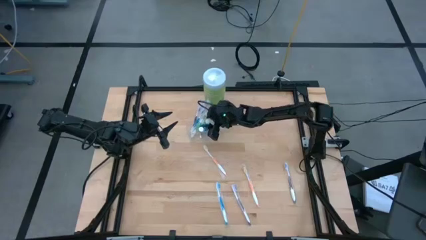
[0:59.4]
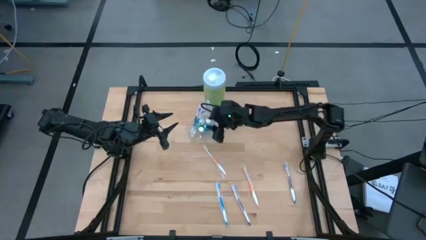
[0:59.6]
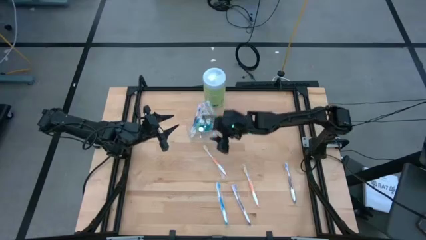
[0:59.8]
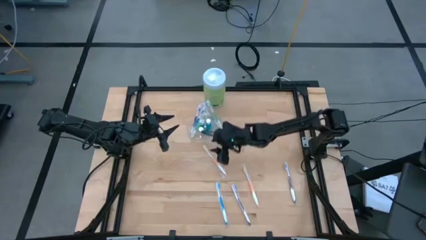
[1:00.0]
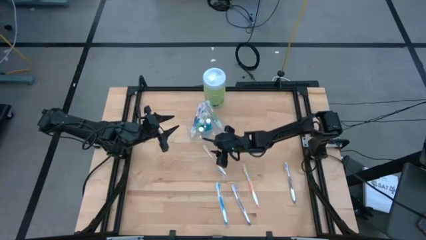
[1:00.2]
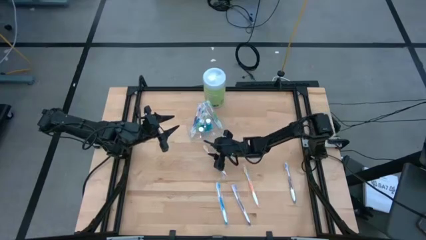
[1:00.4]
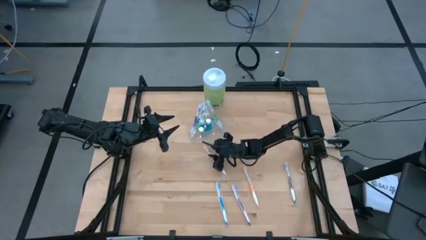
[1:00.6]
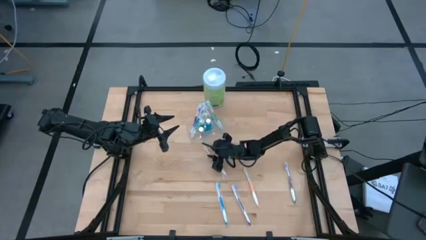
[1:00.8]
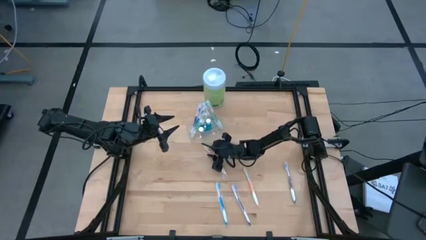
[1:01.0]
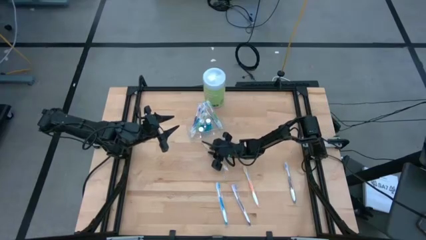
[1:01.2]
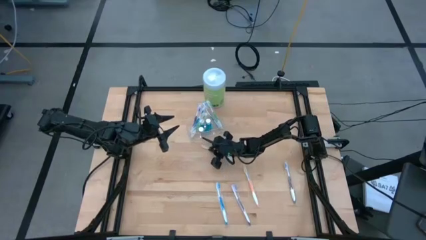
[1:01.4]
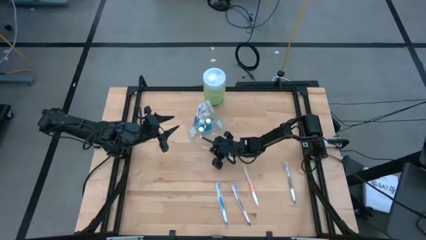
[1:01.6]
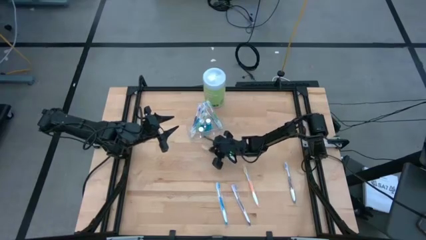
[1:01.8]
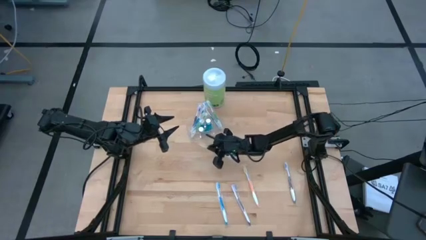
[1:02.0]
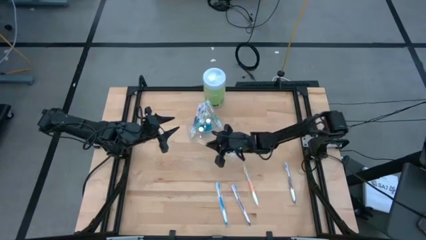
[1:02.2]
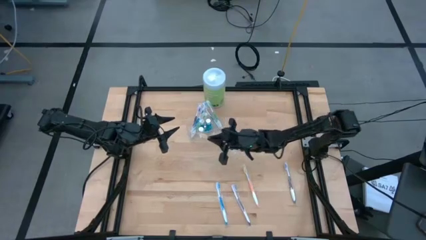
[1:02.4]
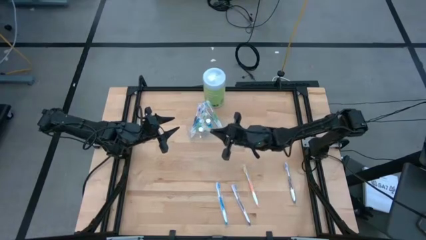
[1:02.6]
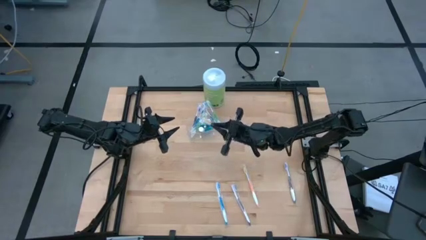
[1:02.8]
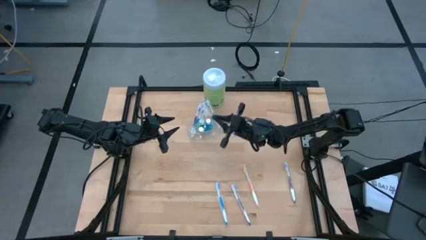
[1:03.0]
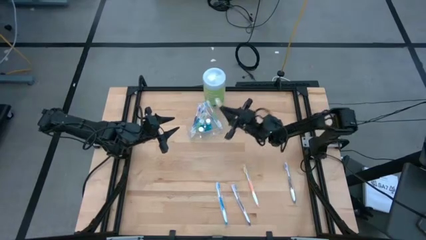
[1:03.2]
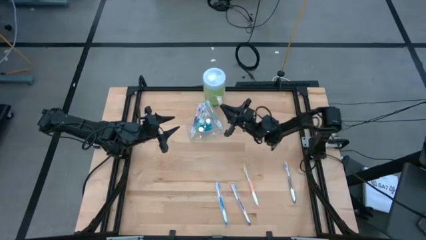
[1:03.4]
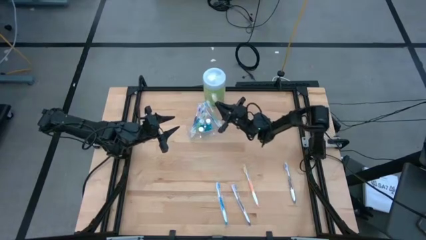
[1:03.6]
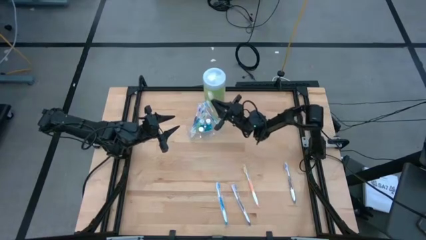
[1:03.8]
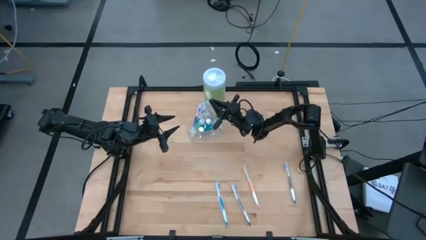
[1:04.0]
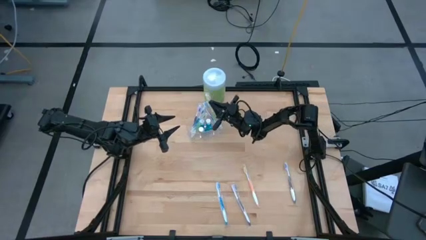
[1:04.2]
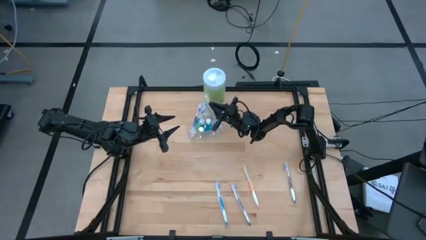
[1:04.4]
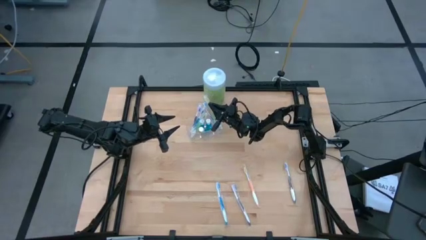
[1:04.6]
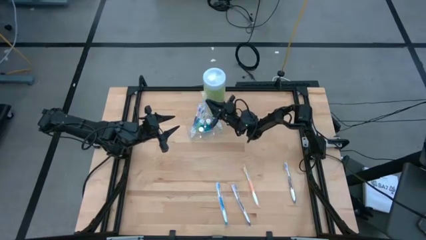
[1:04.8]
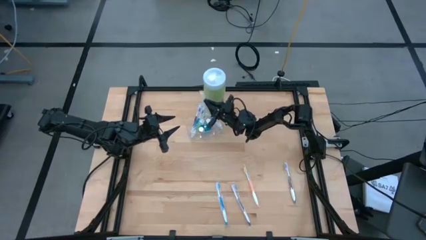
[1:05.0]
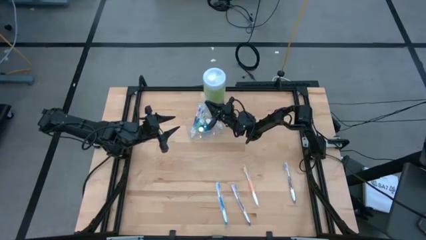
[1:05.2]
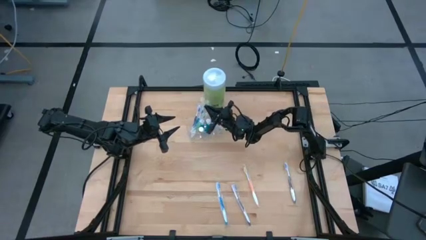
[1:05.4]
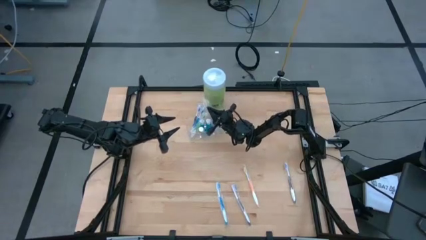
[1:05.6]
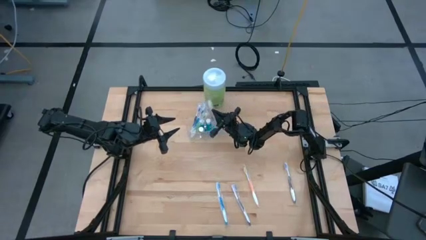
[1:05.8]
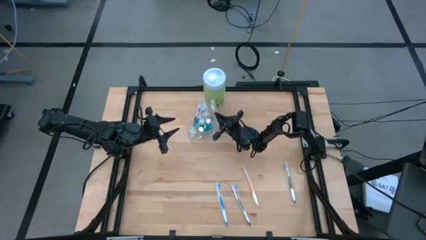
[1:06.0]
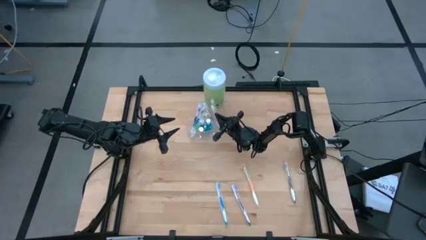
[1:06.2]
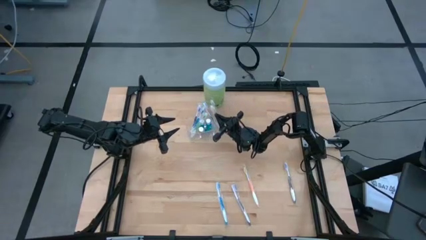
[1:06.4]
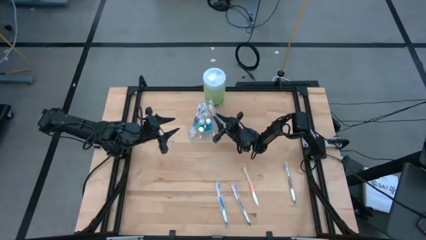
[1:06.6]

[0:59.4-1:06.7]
Task: Pick & Place toothbrushing station
Put the top orange toothbrush into the transparent organizer

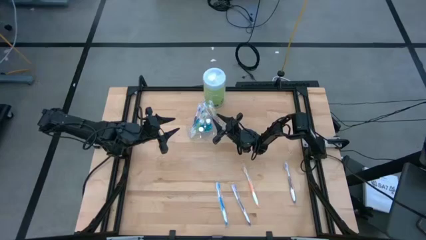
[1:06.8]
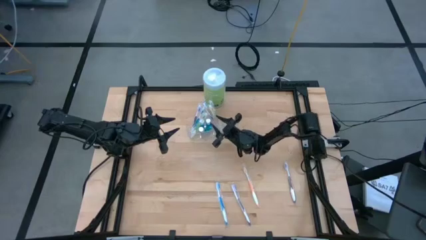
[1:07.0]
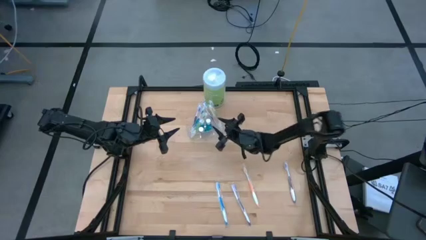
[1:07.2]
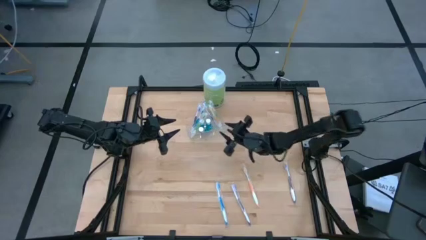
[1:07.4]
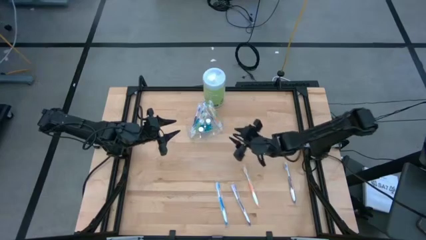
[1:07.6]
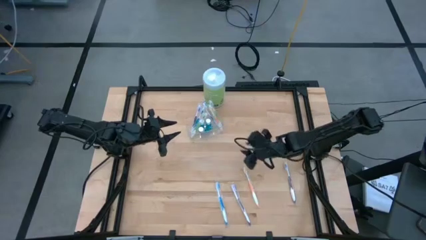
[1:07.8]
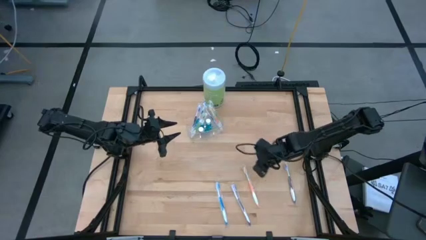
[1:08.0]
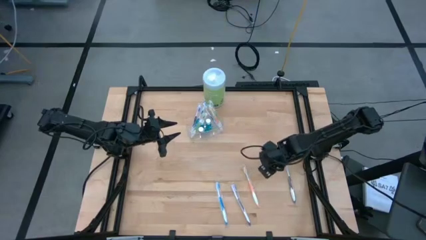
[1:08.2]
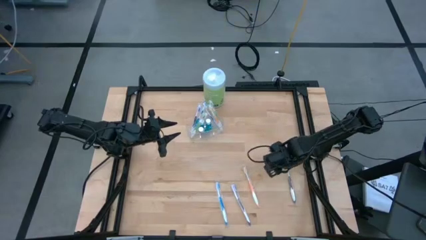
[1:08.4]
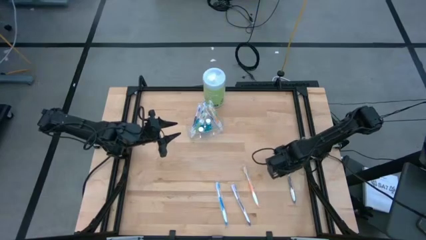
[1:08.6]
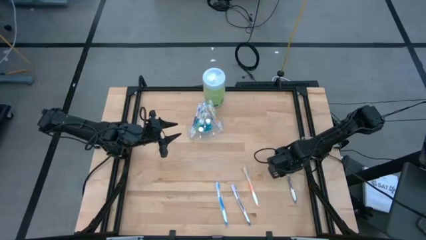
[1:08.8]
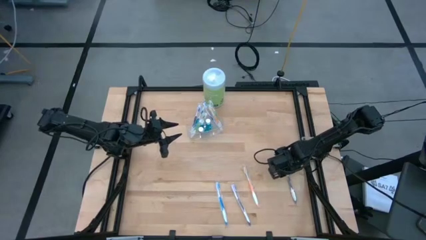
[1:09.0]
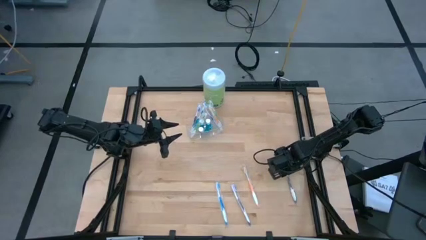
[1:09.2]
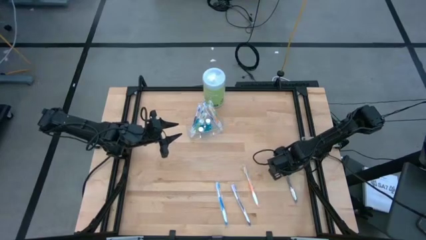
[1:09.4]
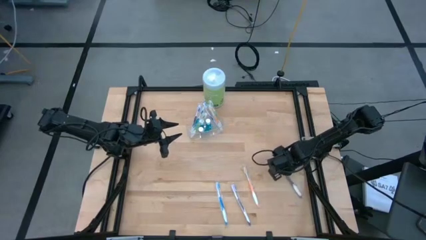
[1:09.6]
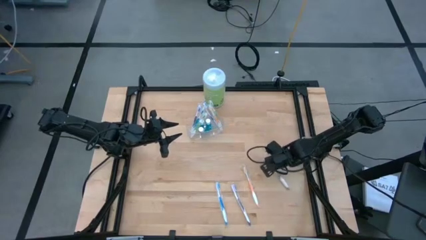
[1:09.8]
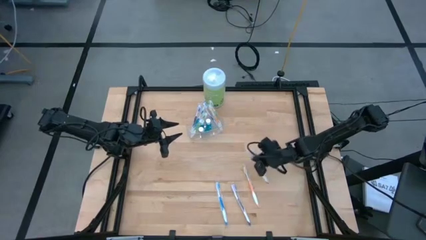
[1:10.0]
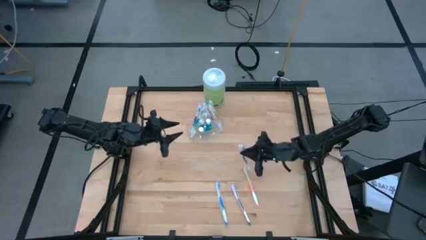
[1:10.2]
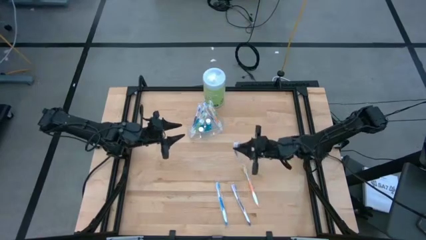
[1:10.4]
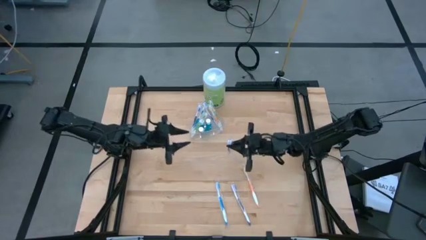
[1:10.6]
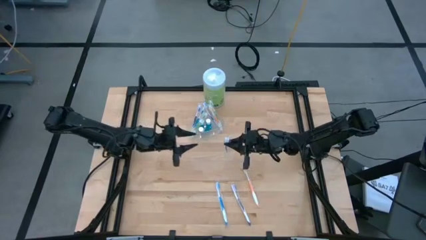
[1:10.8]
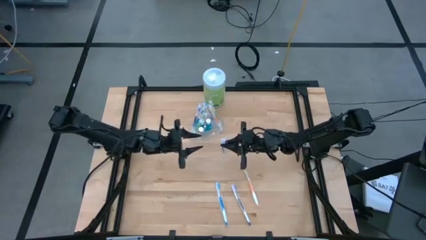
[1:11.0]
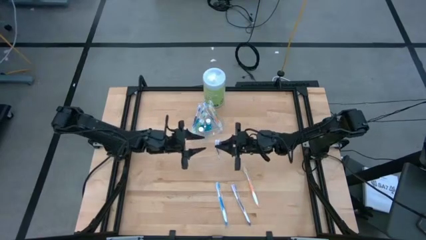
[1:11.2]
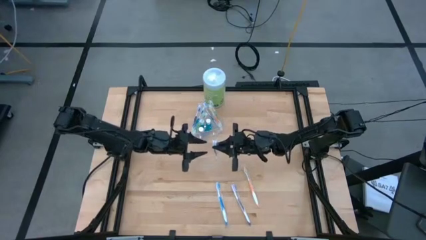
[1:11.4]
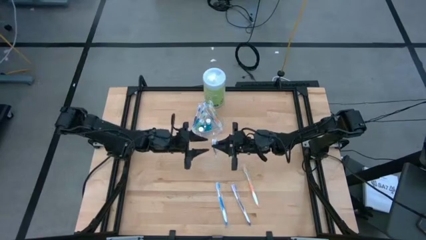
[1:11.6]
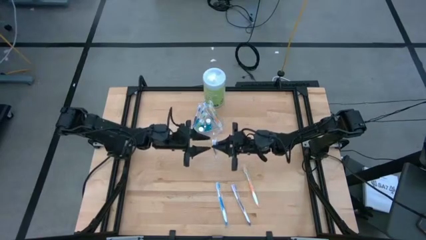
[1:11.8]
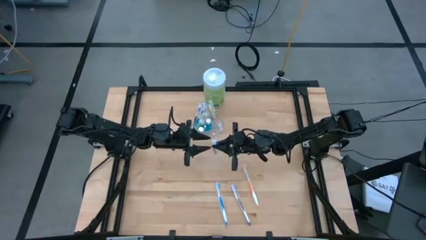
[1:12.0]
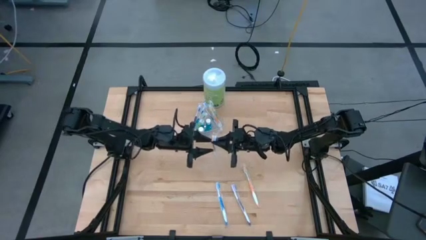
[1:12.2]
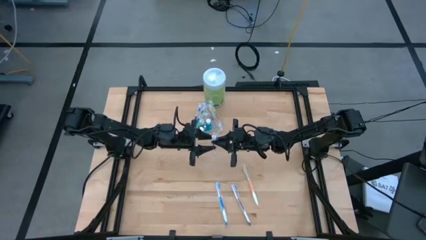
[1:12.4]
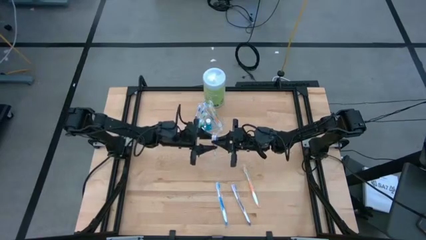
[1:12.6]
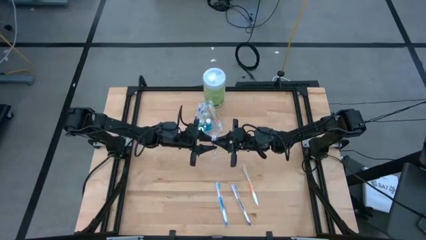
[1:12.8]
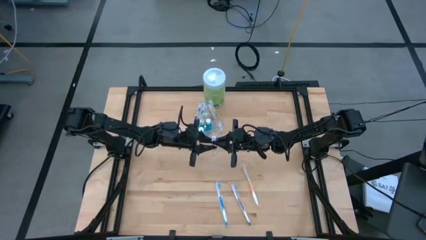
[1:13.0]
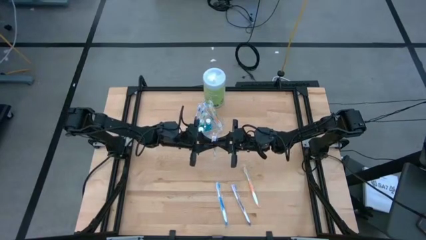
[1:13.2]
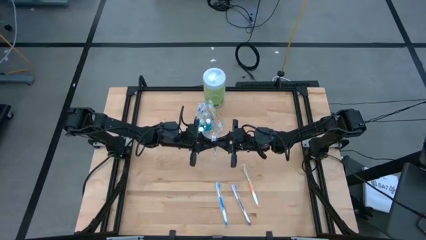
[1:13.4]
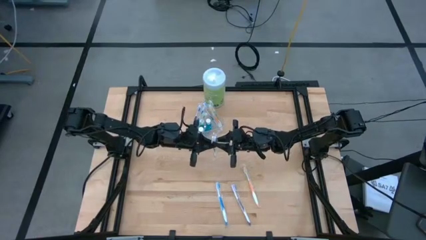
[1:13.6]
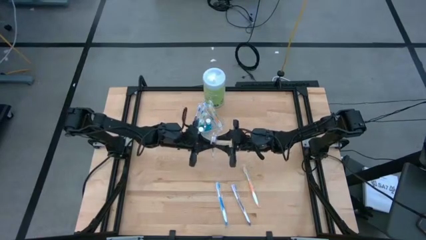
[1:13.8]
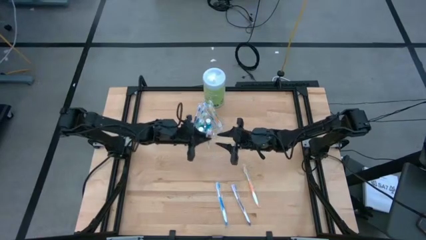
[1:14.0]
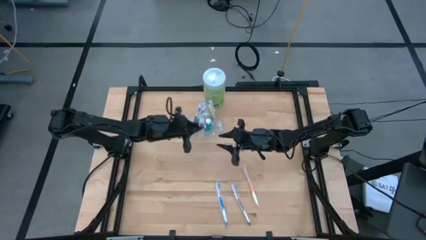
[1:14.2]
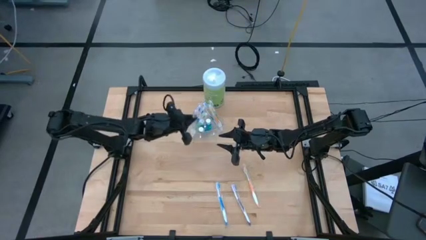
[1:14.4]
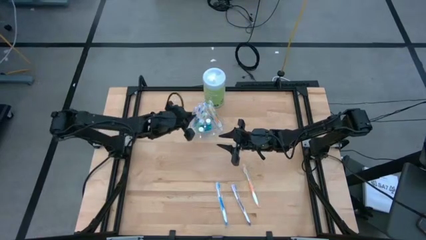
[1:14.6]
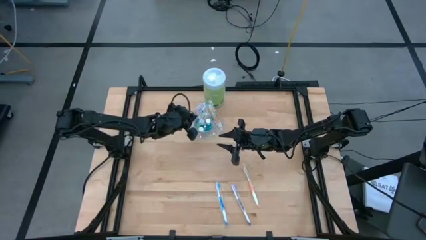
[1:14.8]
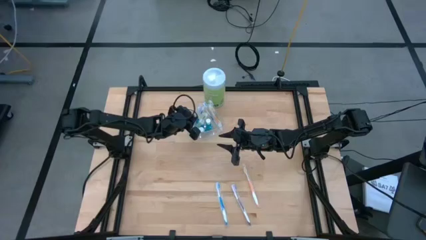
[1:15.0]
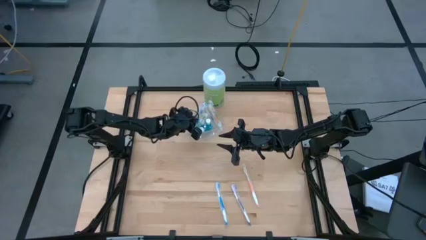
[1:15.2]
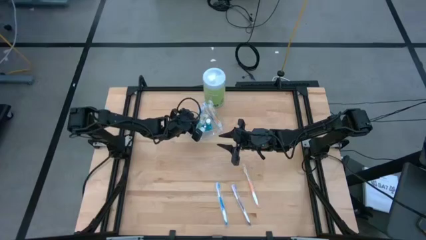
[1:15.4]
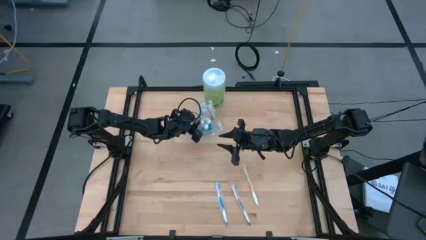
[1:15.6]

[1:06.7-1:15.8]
Put the right purple toothbrush into the transparent organizer
